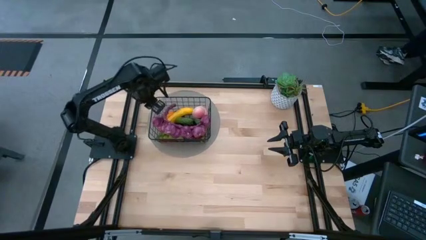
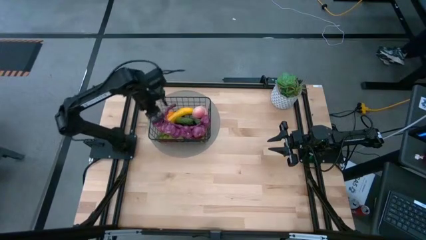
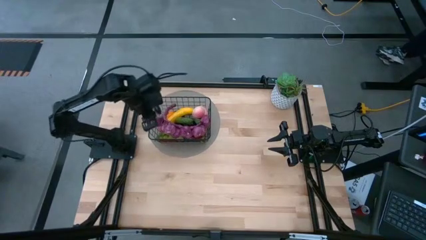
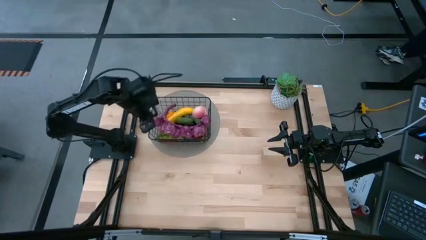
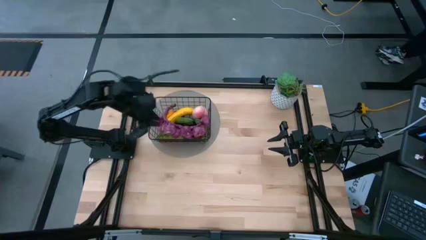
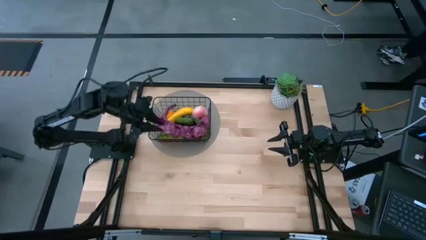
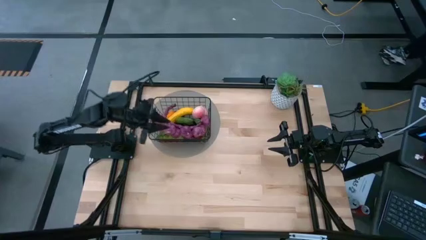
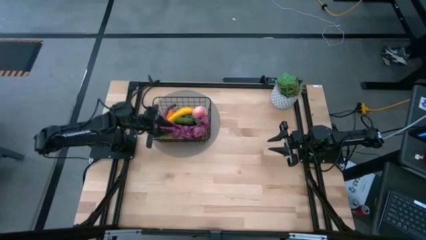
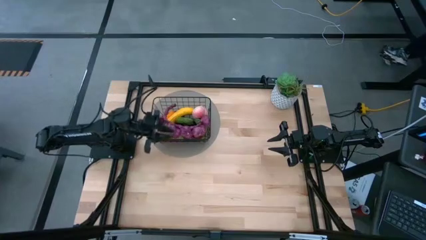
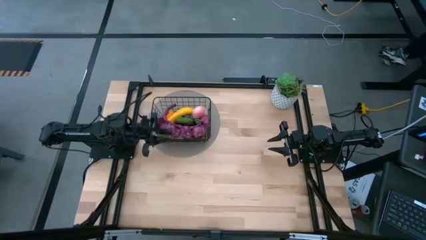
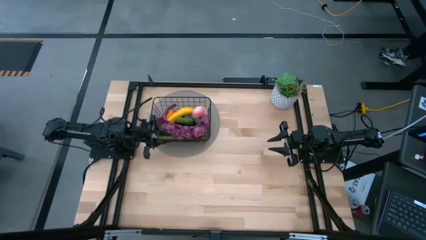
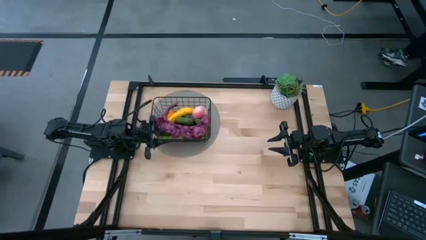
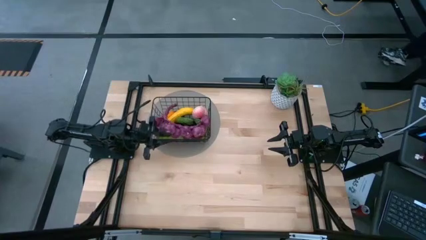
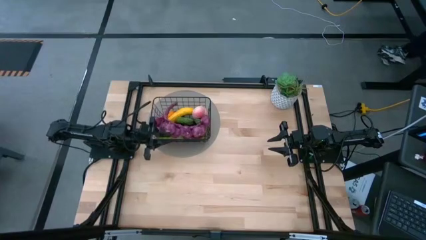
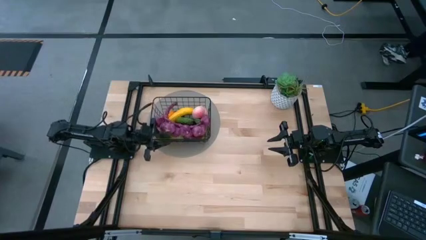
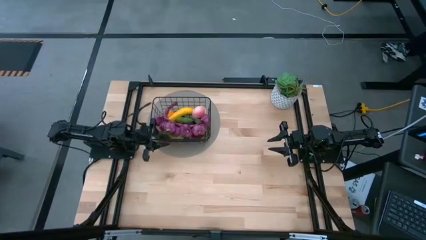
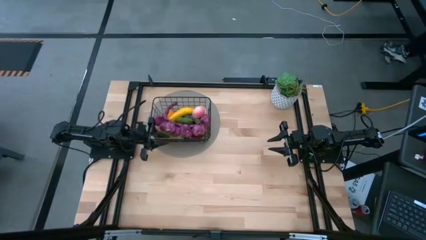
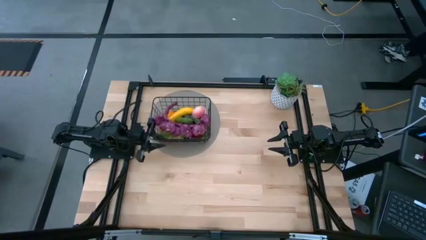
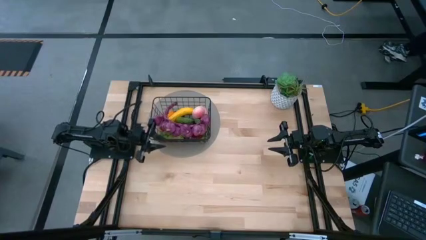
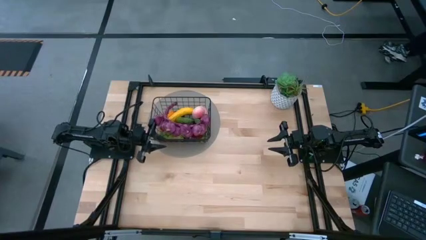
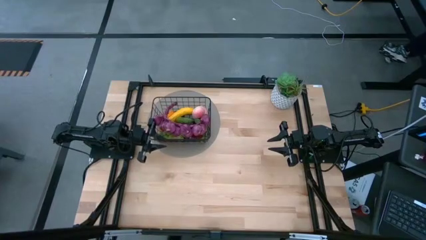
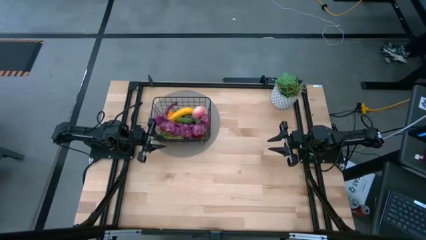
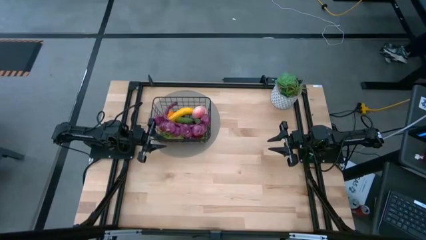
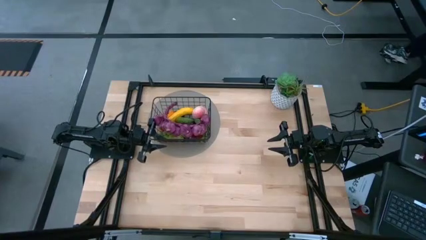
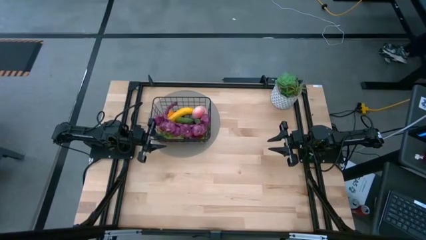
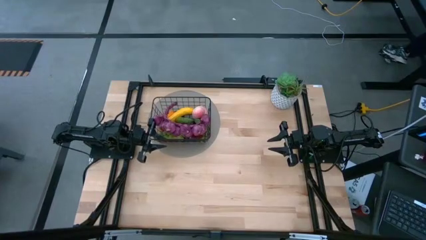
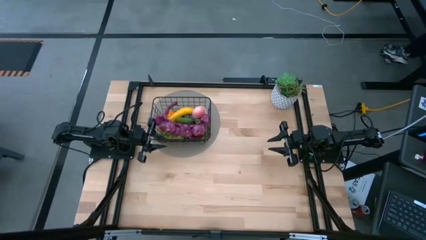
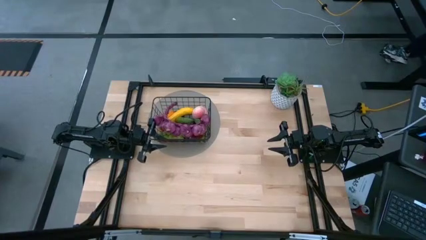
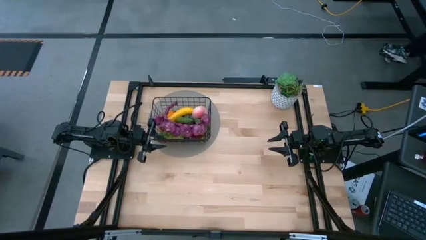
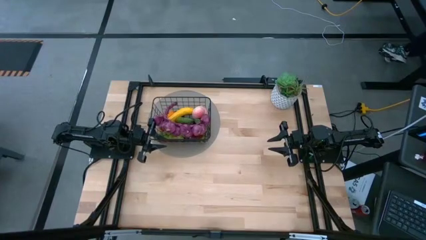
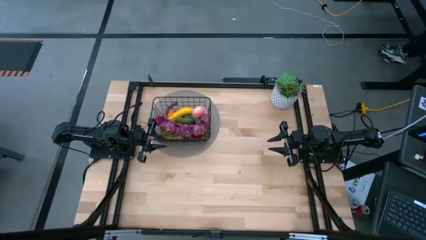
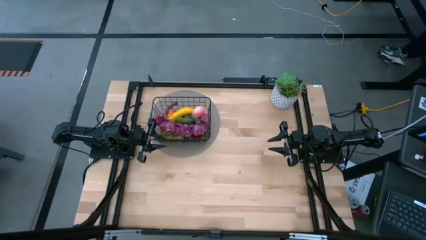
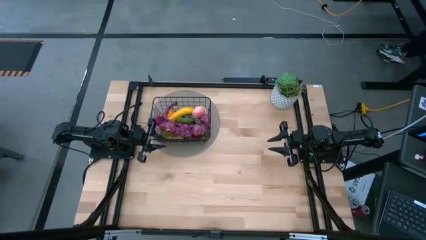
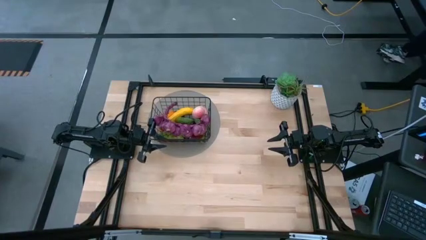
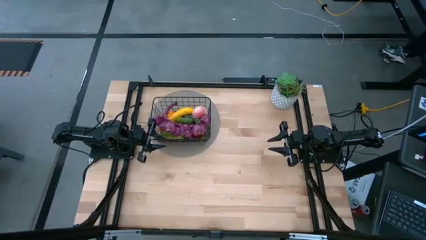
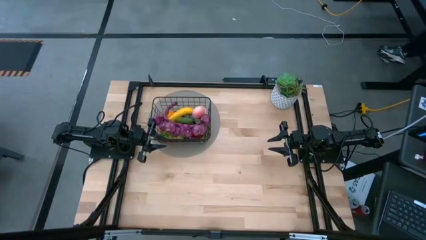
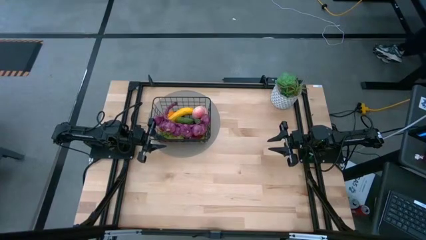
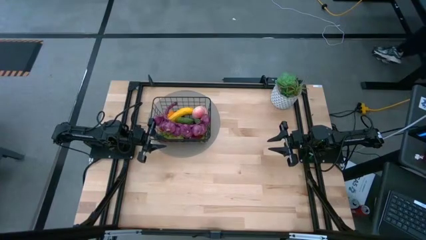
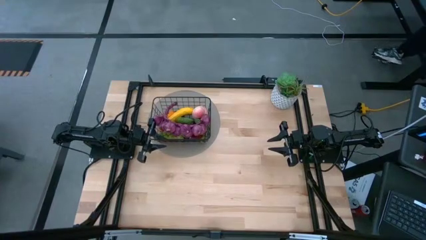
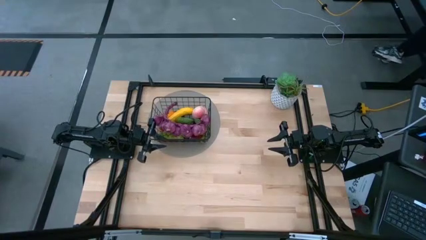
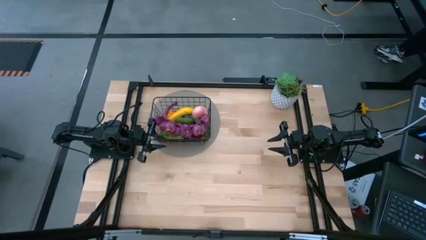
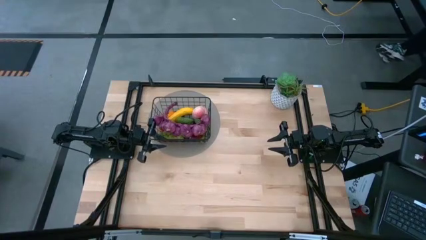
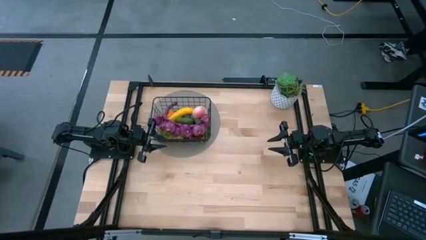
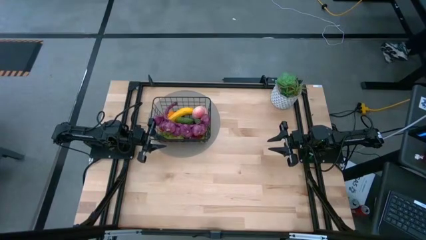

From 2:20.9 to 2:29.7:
Task: Build produce basket
Return to Home Position

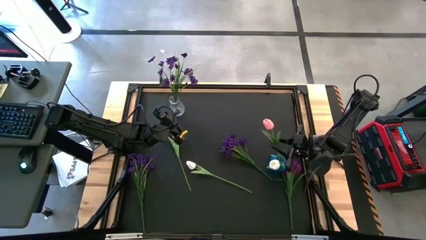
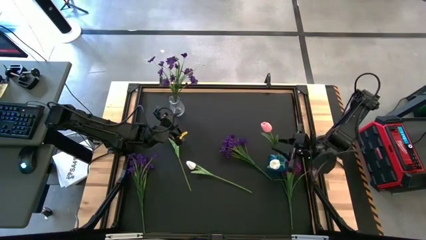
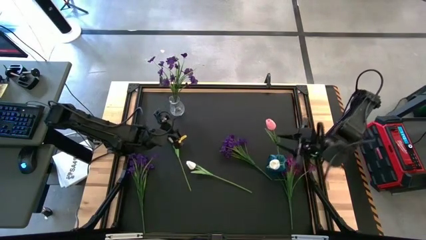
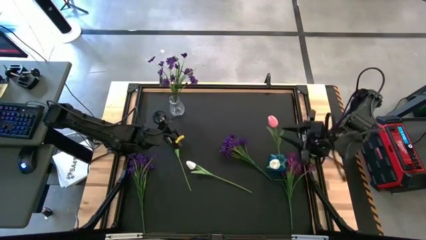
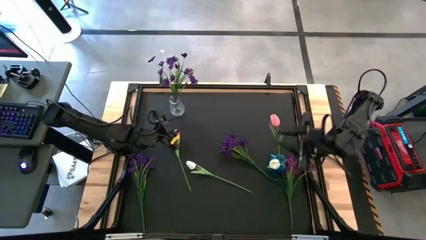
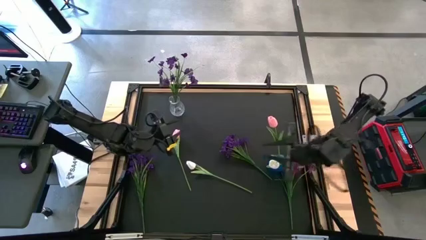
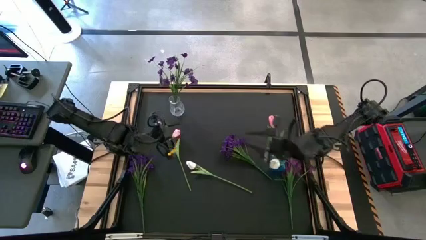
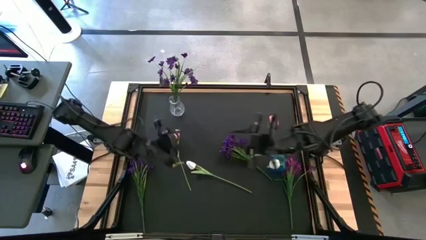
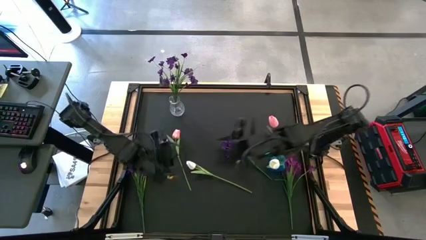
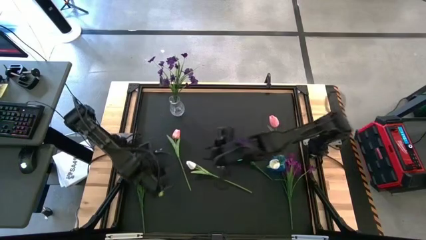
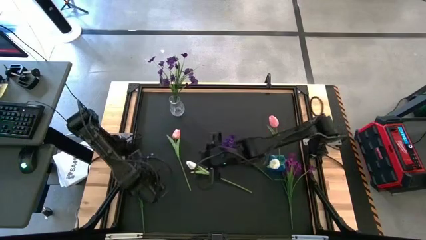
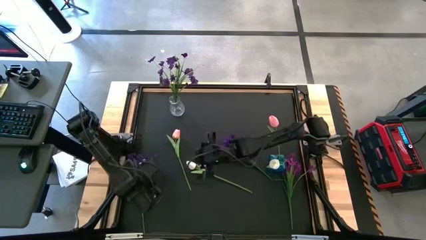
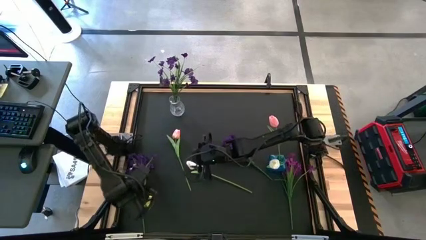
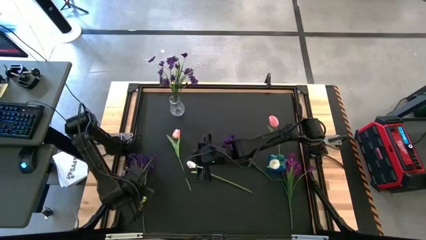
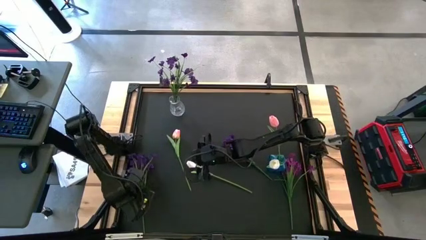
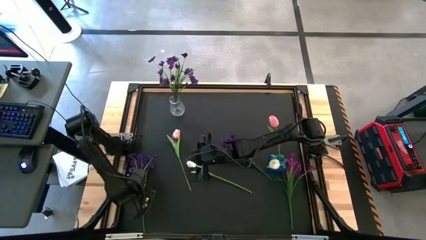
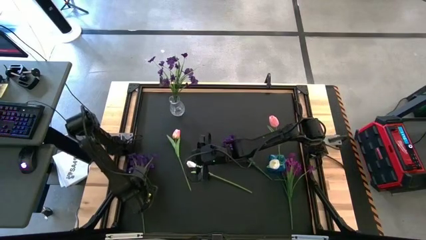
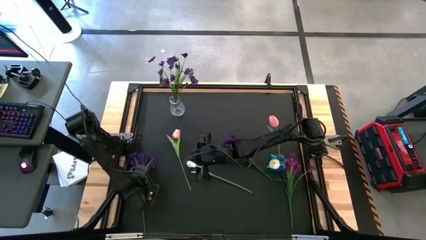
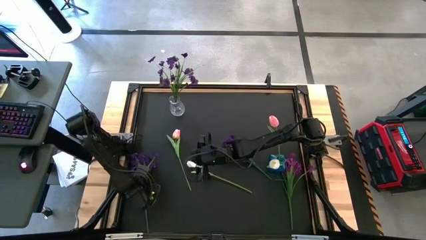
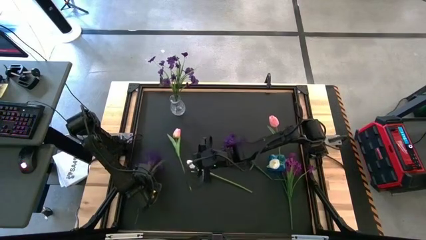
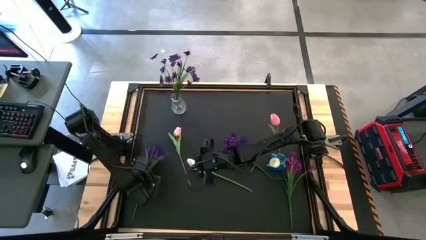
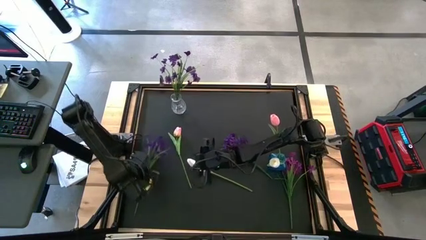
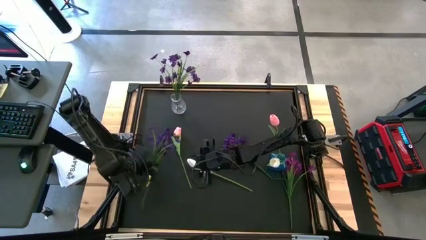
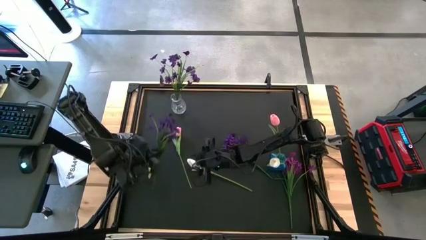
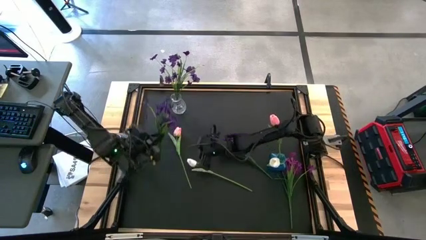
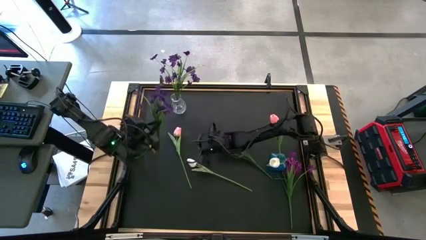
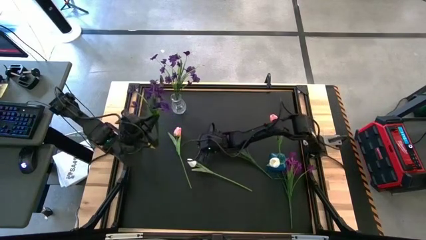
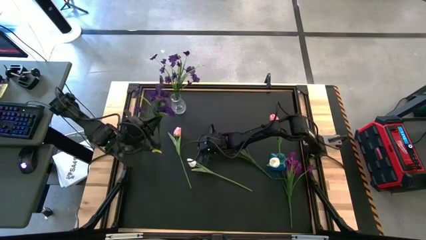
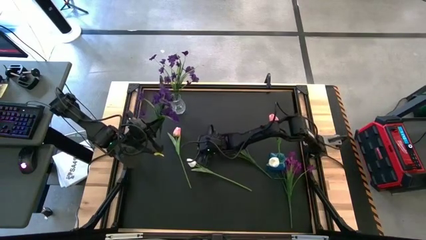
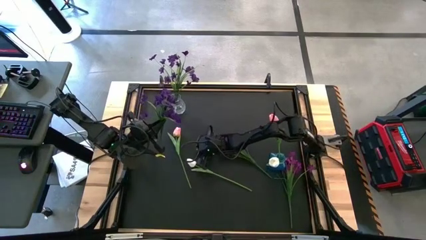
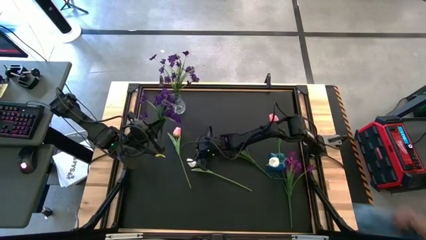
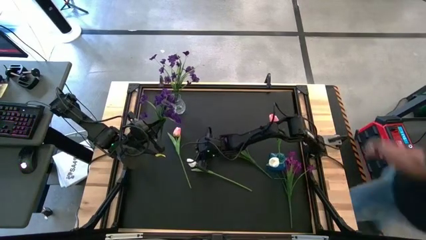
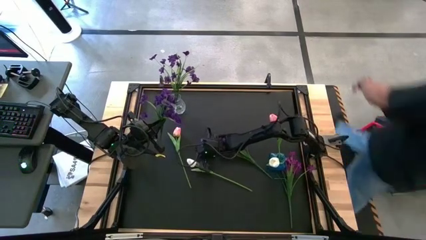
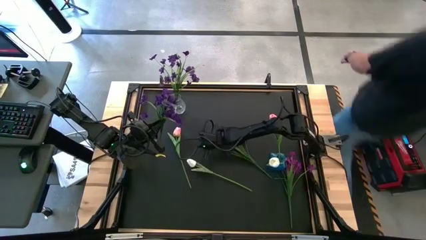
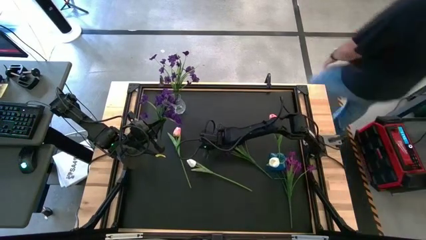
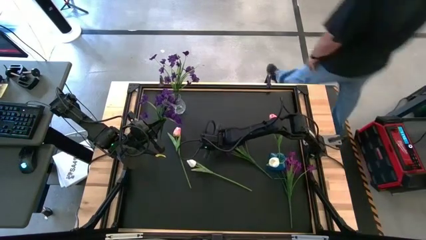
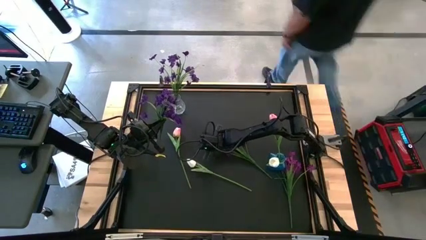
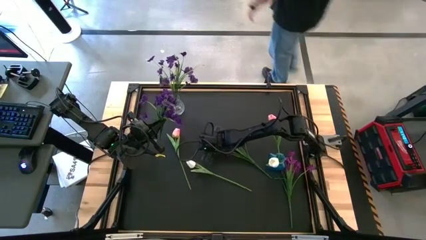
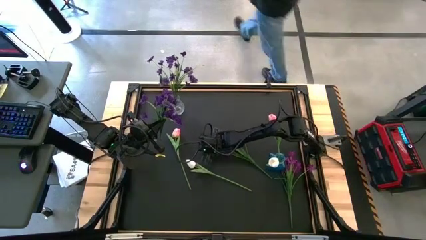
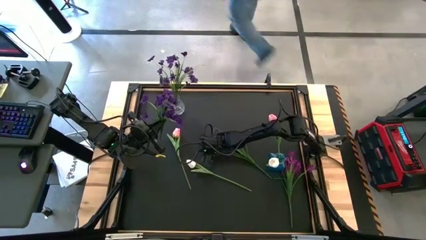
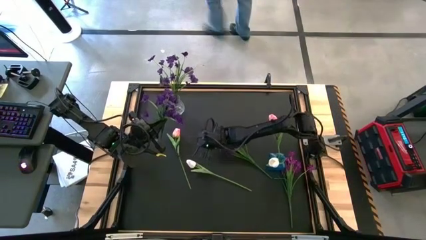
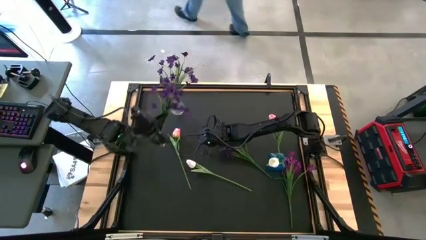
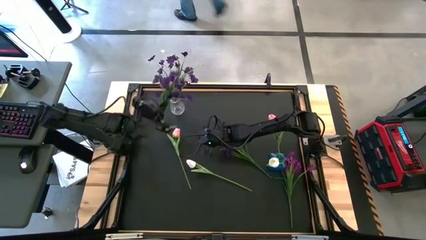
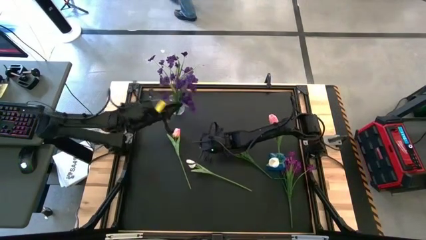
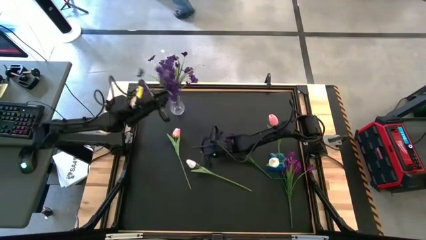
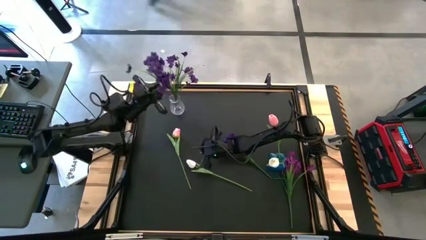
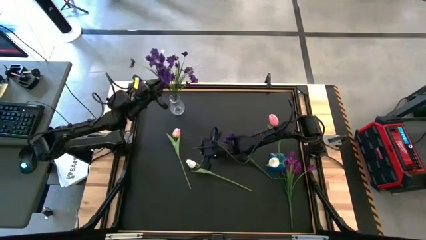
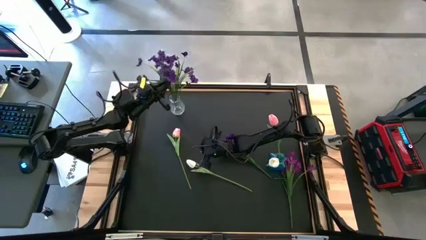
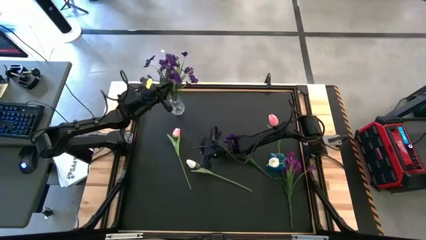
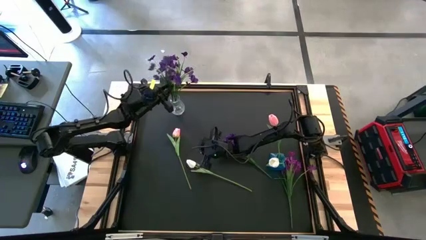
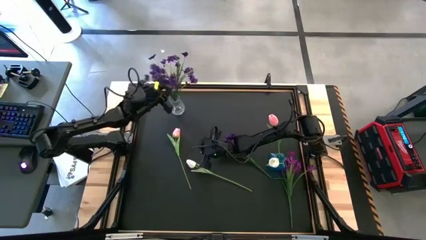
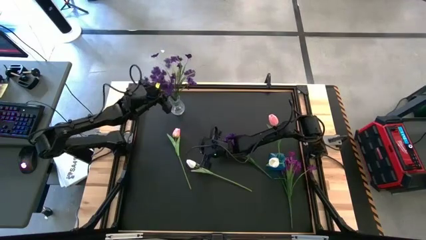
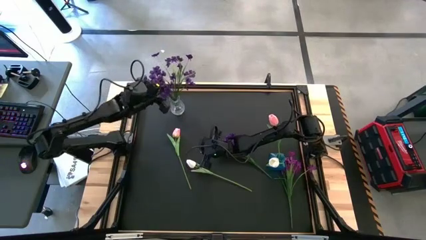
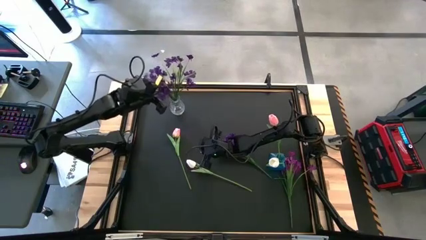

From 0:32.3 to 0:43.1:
Task: Sort flowers into vase by color
Put the left violet flowers into the transparent white vase
